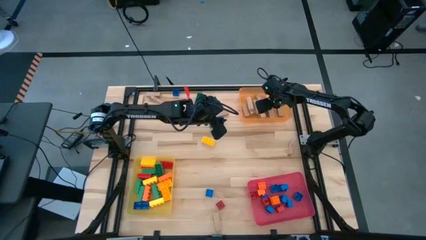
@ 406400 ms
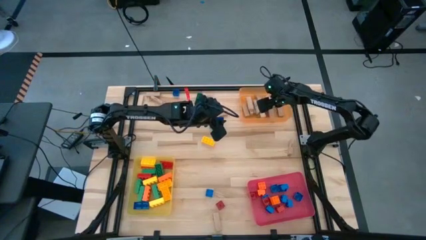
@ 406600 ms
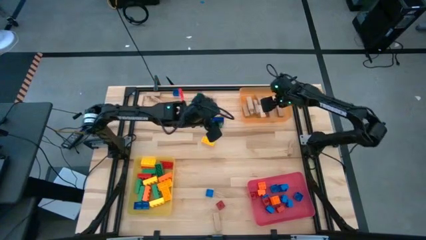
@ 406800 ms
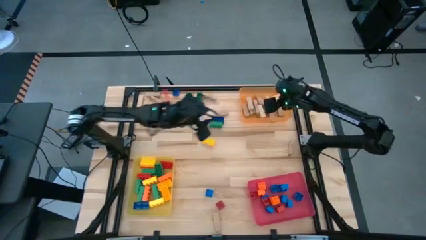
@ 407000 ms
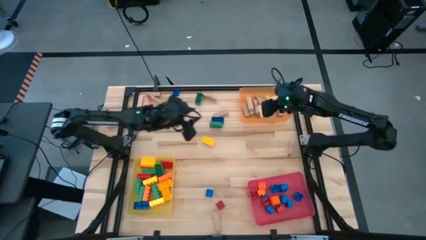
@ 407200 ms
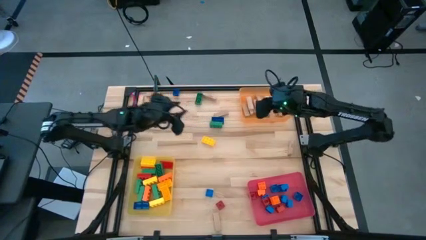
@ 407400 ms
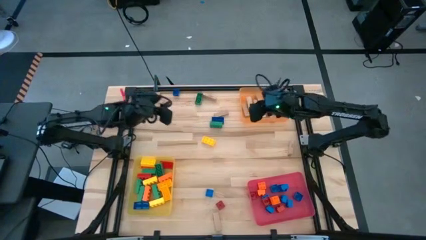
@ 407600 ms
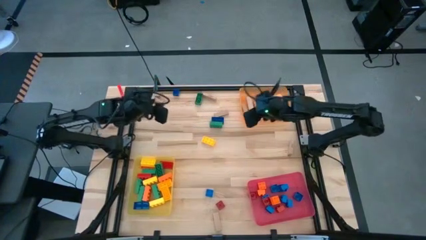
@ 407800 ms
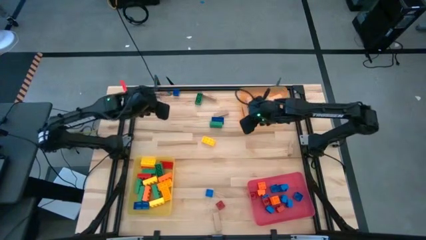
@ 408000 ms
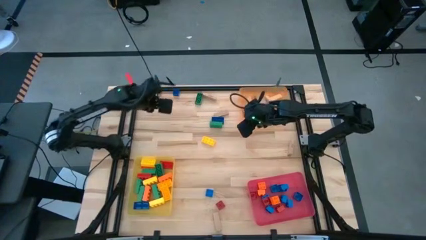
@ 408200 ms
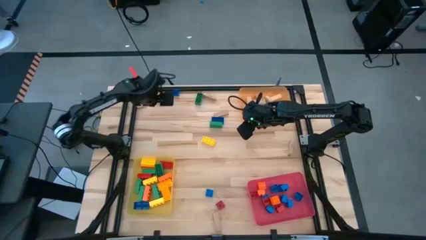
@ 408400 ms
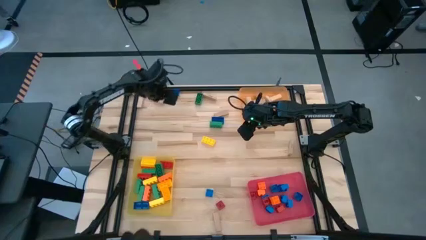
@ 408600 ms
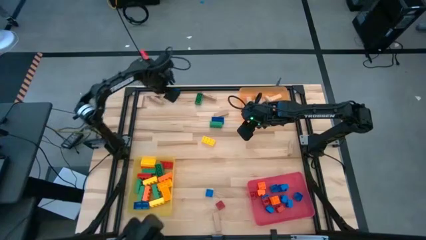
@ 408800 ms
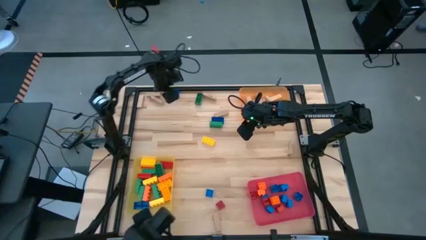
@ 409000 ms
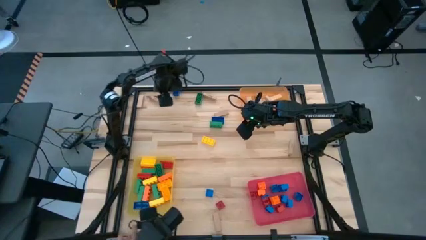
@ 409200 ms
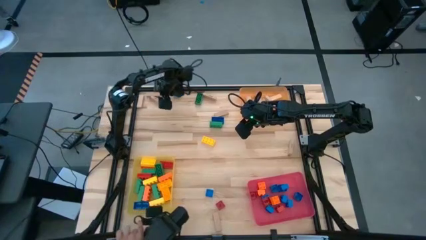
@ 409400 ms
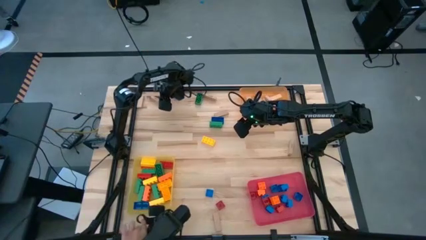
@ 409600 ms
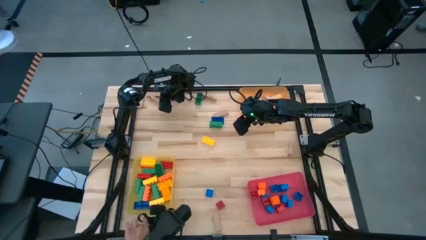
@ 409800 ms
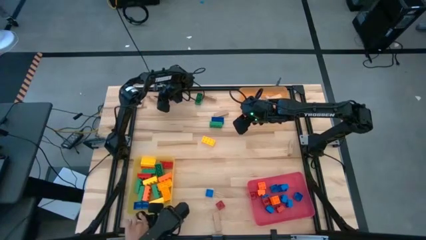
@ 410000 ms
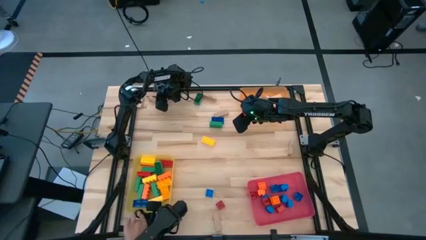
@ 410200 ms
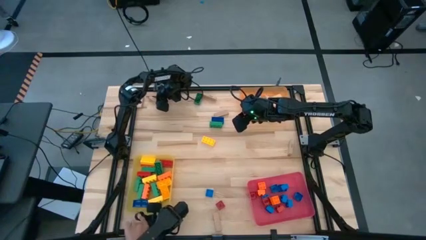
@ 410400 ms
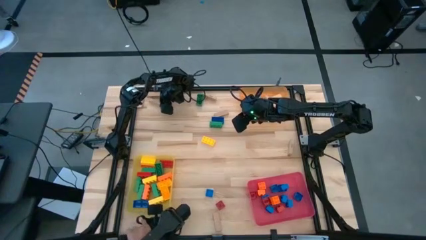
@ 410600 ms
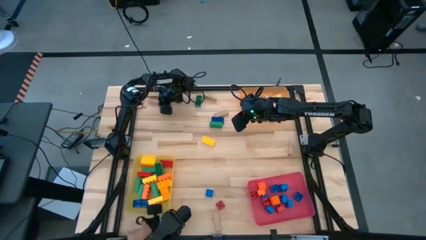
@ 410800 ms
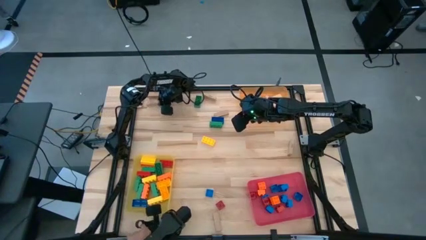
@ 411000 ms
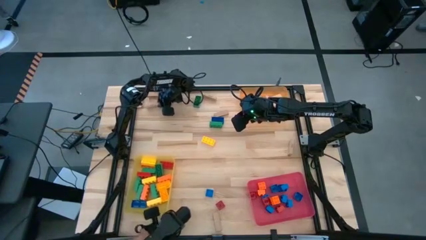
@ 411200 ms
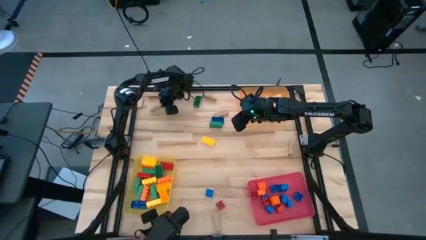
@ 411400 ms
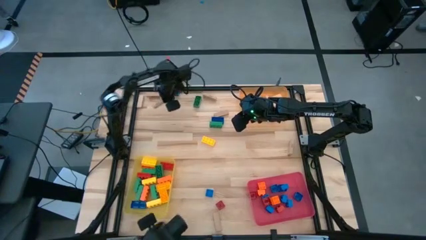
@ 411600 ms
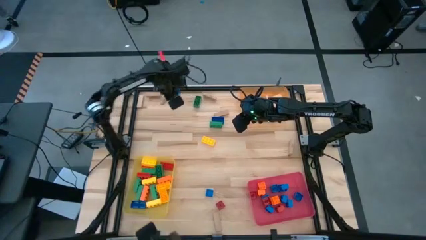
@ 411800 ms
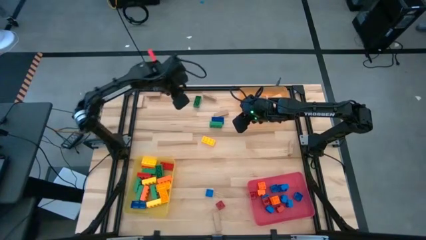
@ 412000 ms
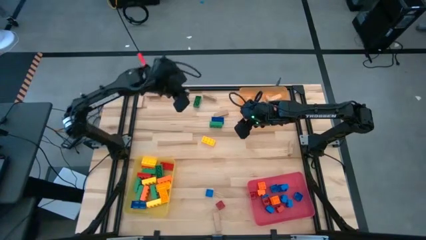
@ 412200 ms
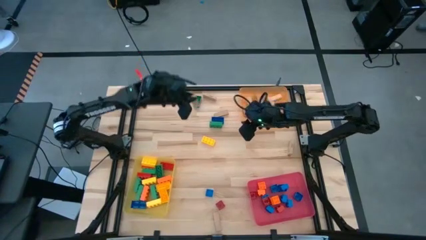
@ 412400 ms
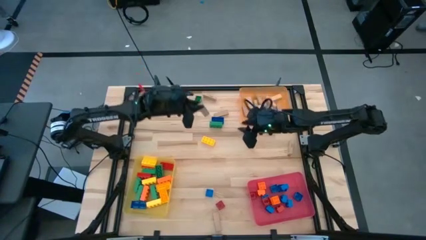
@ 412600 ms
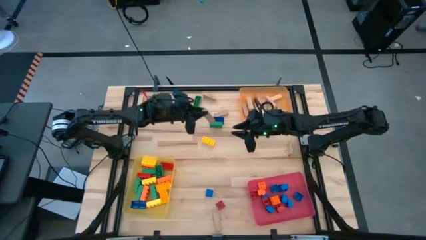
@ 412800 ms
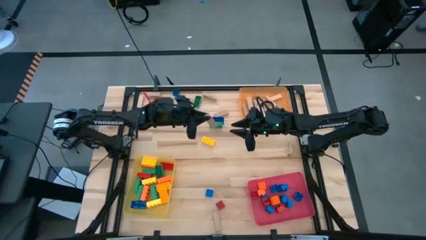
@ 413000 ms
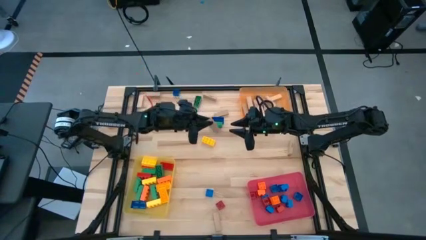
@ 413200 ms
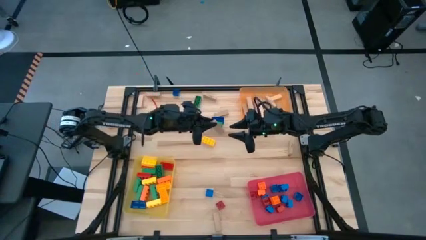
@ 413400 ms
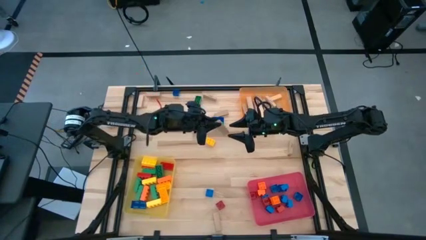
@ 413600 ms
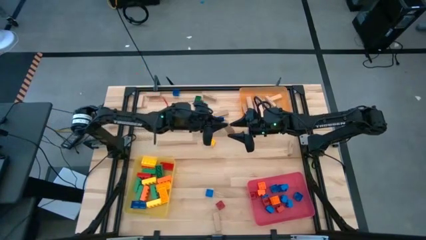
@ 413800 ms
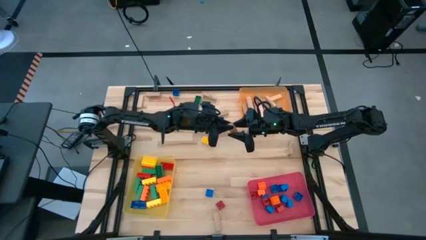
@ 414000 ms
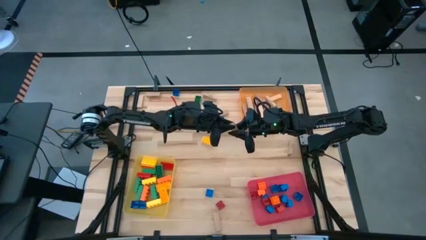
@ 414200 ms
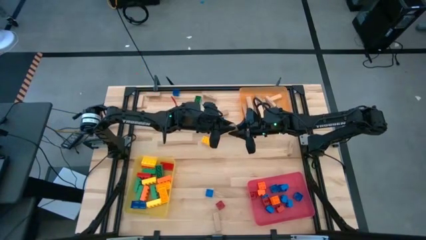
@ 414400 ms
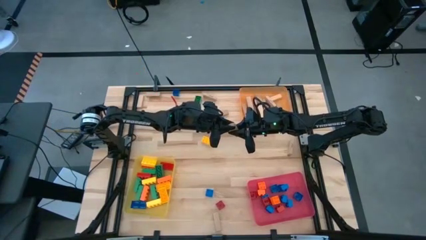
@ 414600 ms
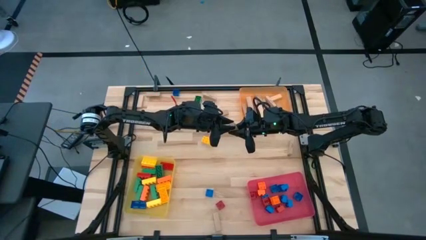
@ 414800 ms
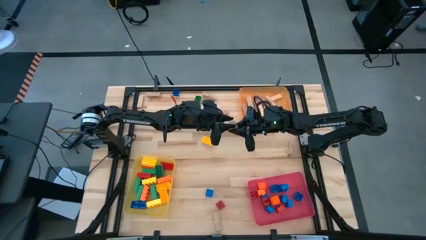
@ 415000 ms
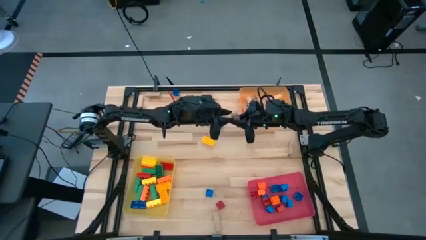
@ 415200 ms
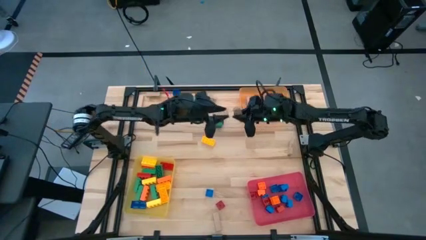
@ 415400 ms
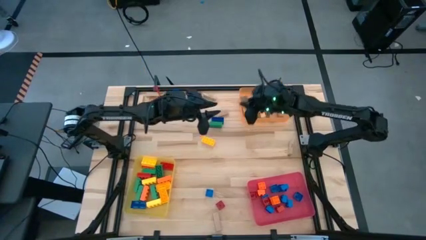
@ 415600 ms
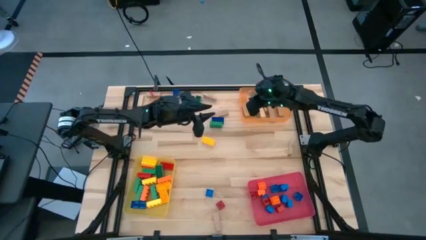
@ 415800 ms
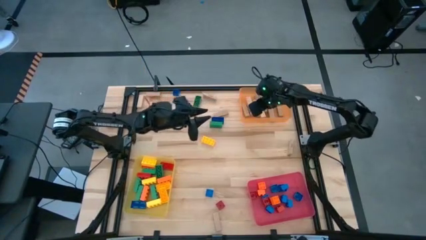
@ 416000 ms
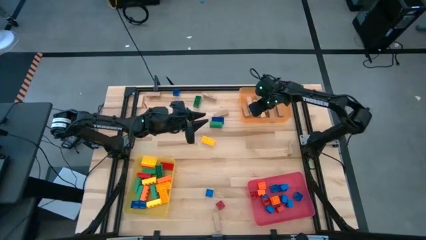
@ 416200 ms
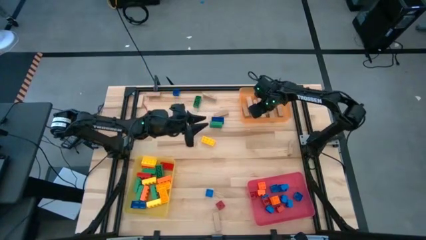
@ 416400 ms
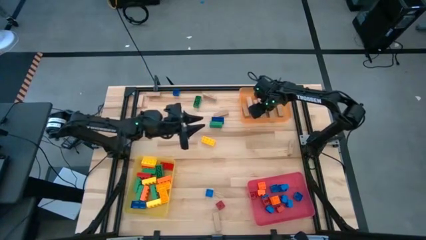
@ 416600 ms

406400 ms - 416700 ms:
Task: Sort blocks by size
Put the brown block into the orange bin

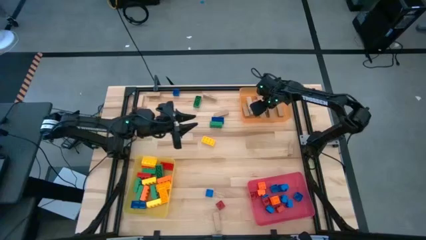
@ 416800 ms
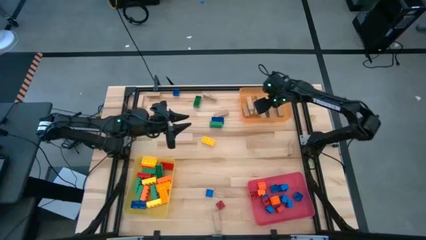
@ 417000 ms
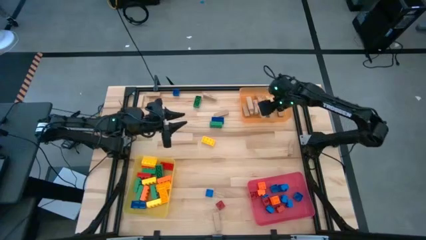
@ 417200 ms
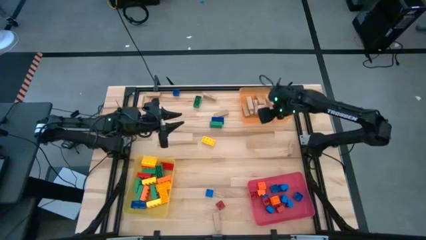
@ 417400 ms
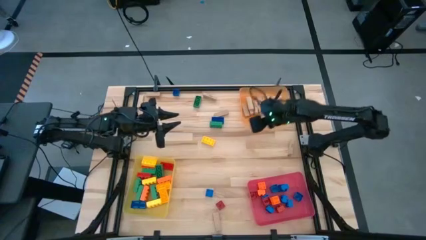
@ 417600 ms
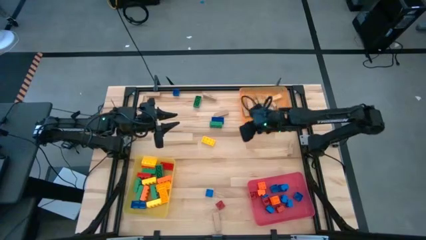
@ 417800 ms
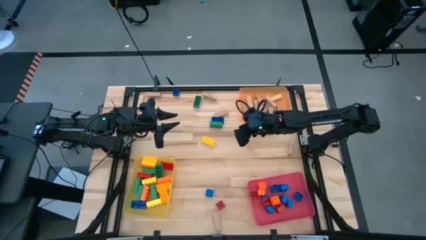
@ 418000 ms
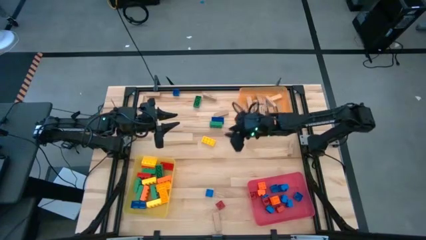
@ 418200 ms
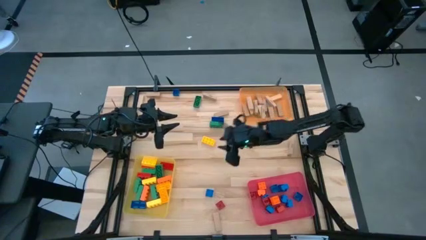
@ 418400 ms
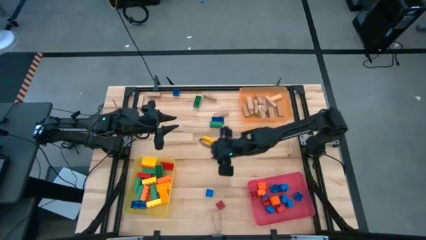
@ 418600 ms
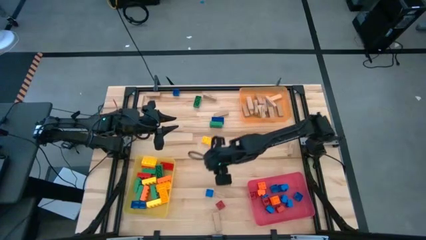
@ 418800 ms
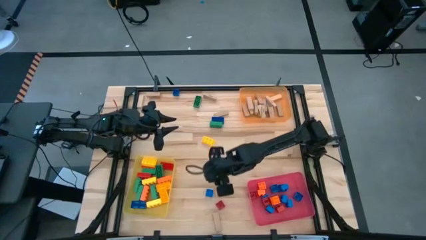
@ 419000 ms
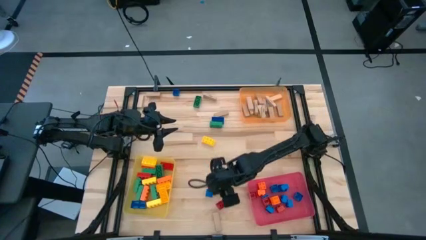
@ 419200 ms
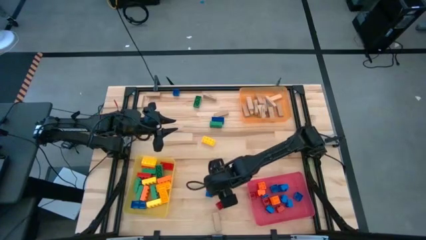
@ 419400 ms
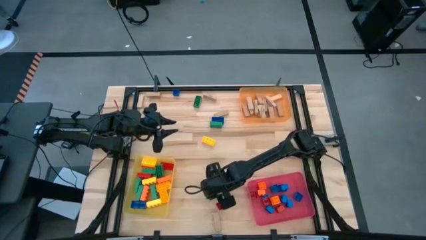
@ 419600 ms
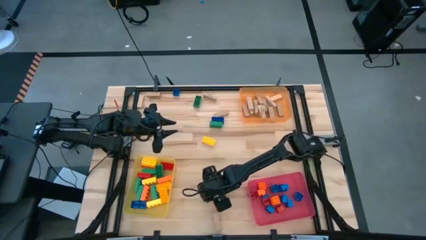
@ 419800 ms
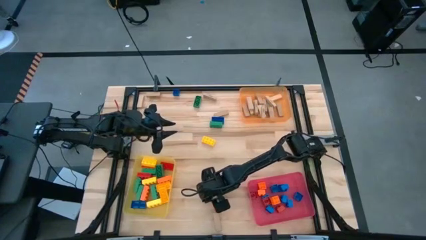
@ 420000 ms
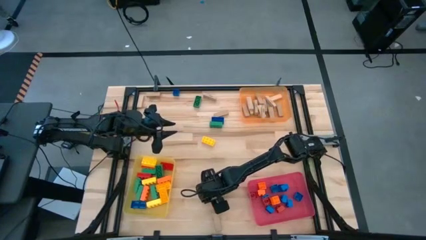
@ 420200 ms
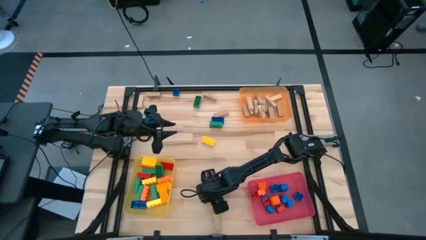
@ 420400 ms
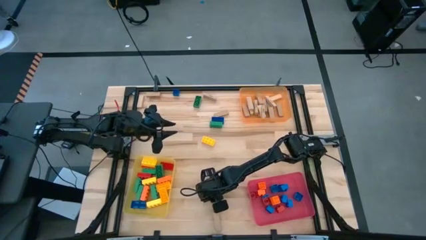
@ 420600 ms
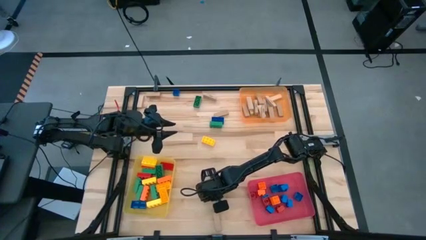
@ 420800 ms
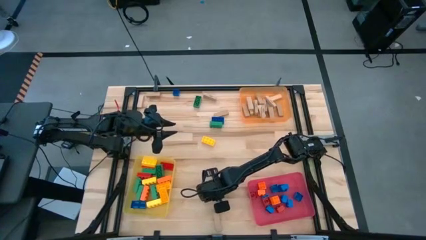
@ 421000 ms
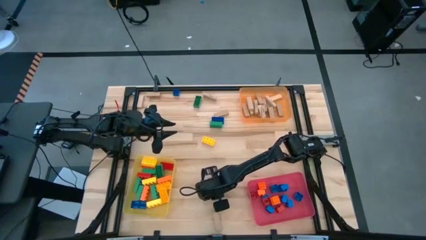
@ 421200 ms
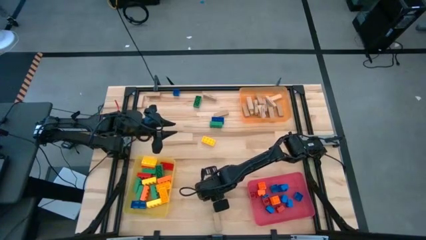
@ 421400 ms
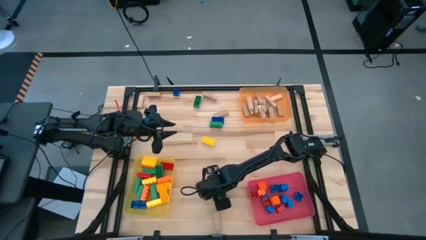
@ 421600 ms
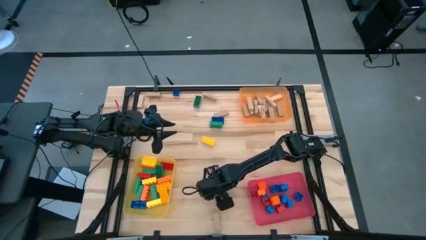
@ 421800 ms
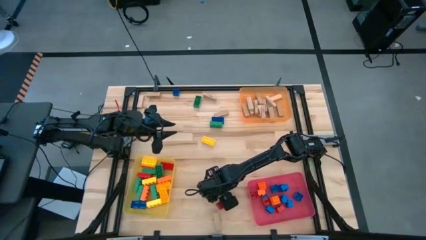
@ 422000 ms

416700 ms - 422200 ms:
Put the small blue game piece into the red bin

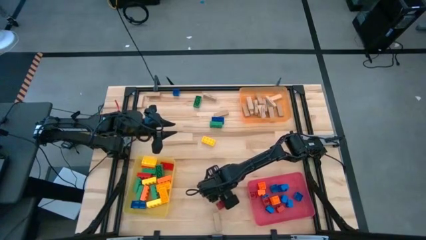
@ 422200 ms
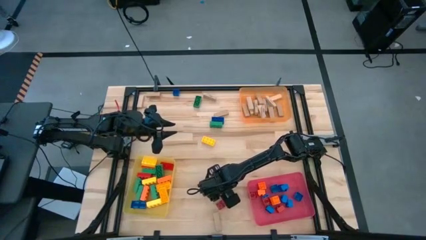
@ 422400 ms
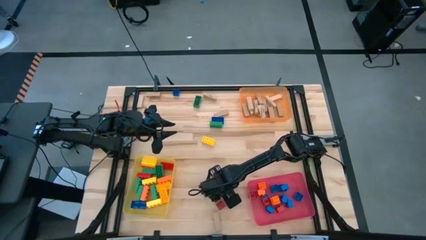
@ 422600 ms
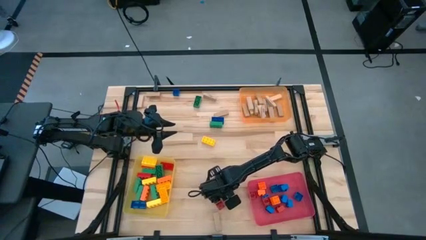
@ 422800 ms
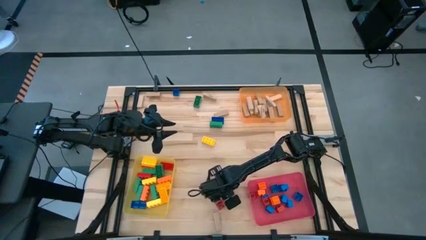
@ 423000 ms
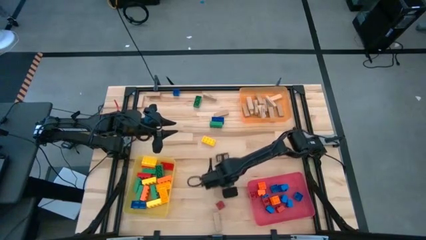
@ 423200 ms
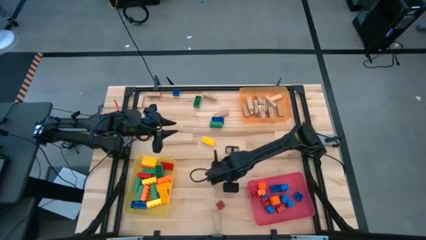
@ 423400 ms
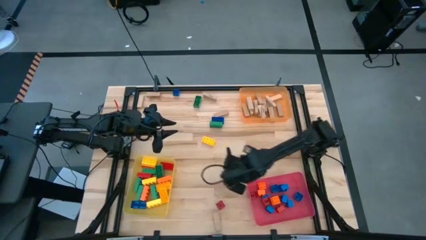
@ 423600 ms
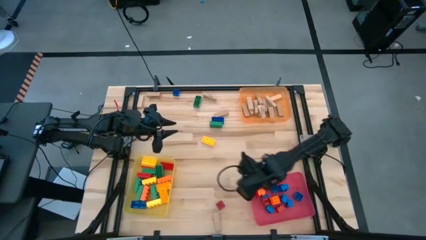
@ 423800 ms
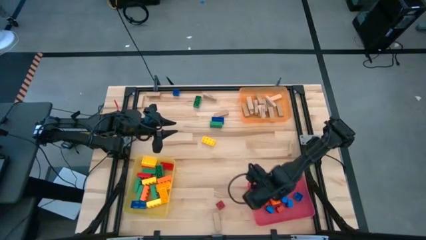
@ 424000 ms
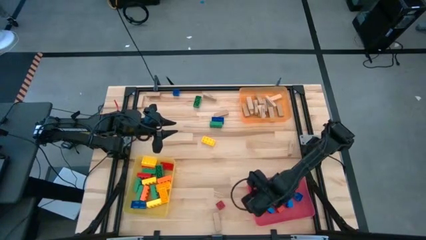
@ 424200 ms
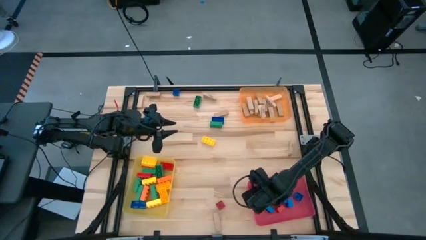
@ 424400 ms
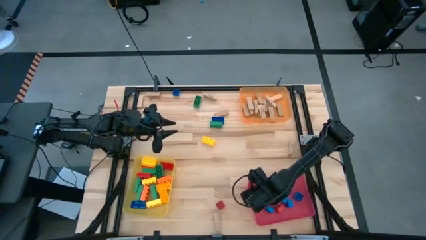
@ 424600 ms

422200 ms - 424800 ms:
Put the small blue game piece into the red bin
